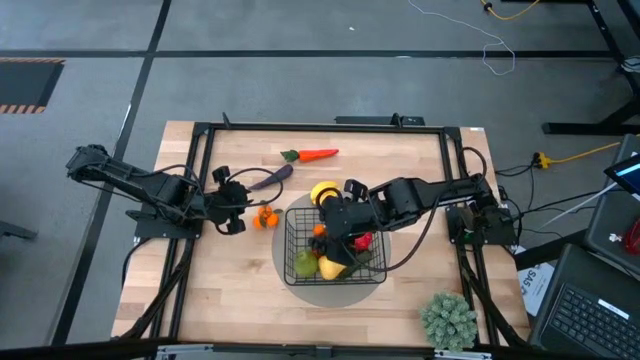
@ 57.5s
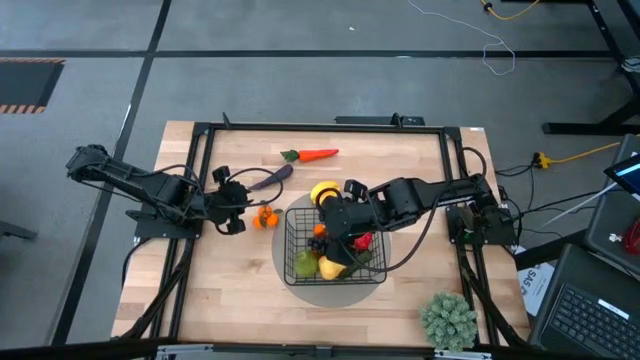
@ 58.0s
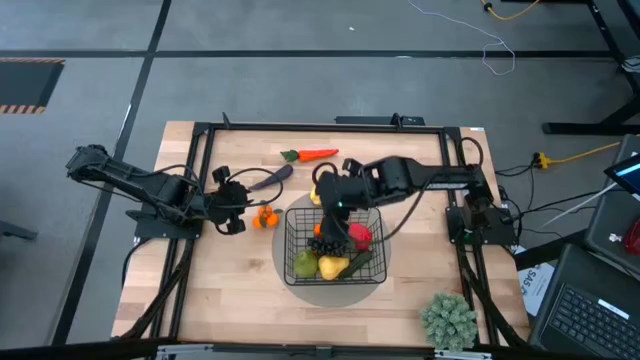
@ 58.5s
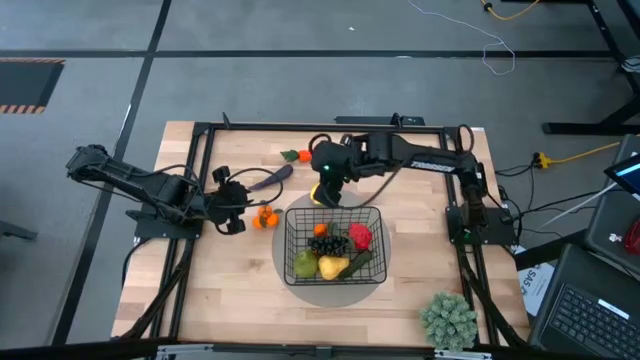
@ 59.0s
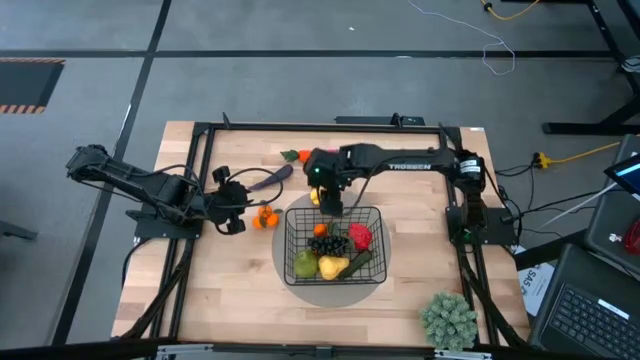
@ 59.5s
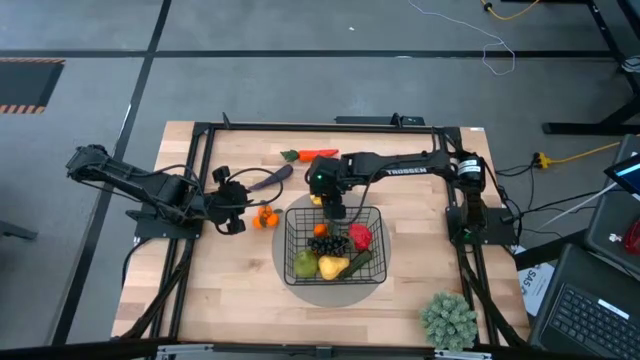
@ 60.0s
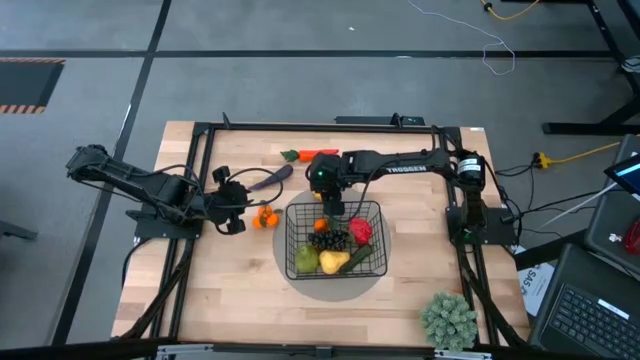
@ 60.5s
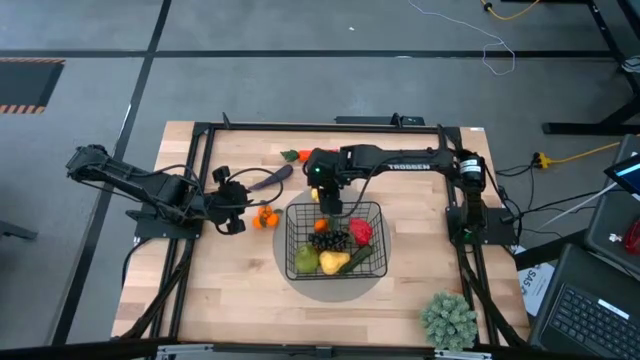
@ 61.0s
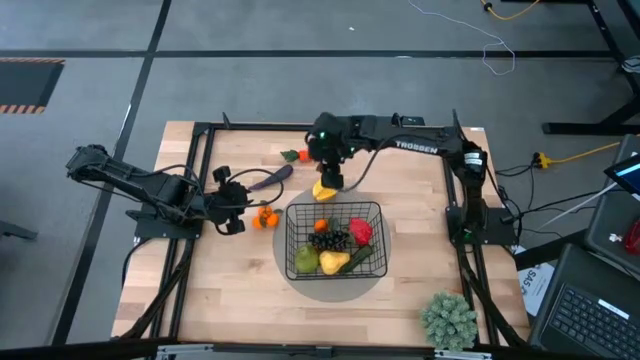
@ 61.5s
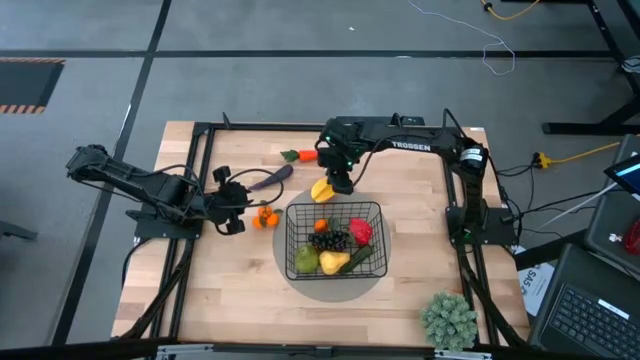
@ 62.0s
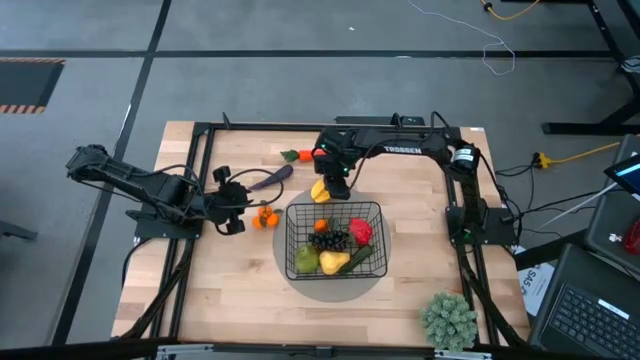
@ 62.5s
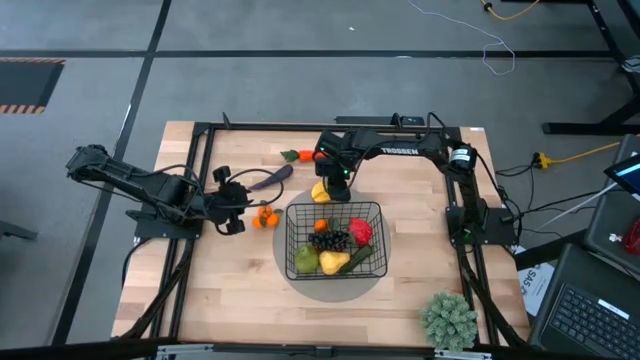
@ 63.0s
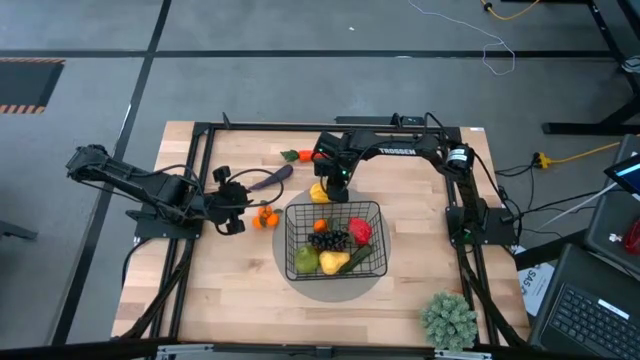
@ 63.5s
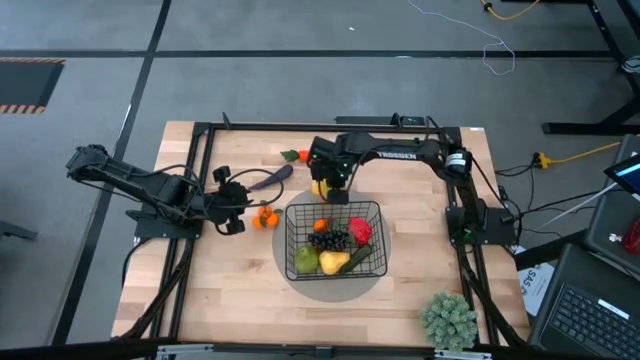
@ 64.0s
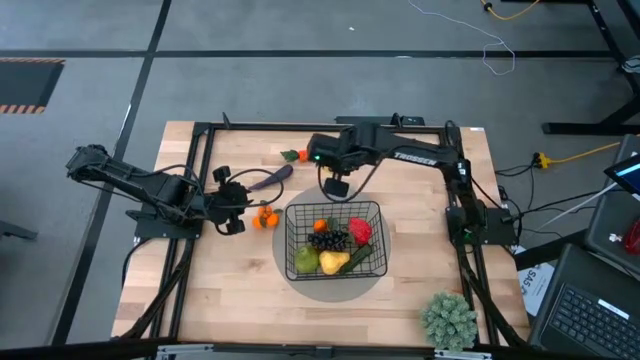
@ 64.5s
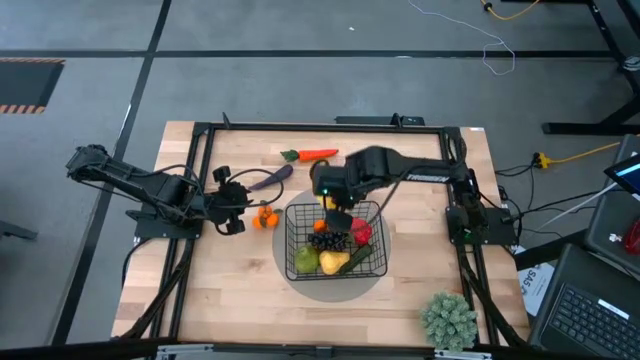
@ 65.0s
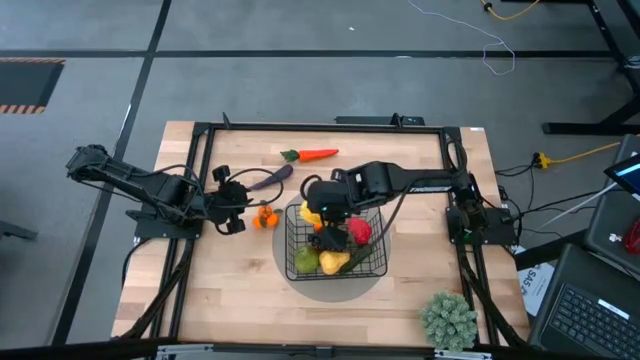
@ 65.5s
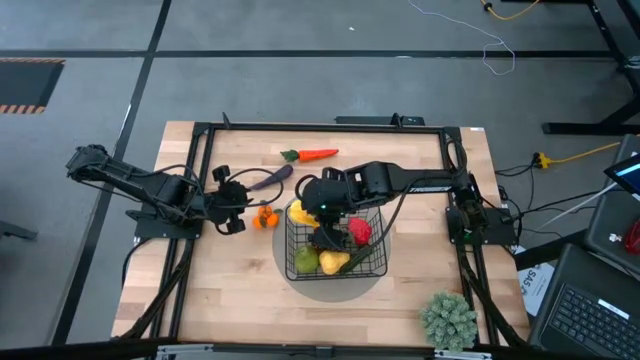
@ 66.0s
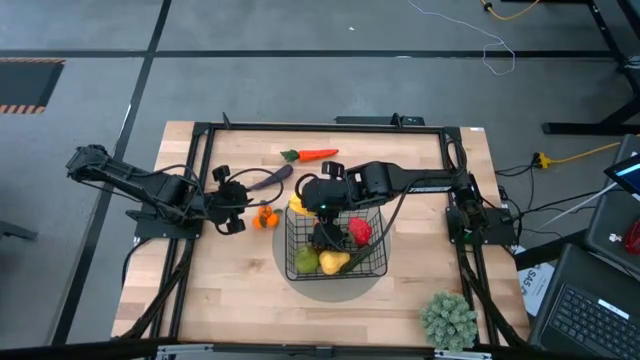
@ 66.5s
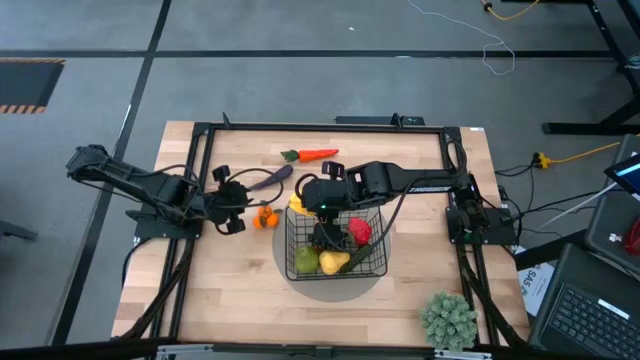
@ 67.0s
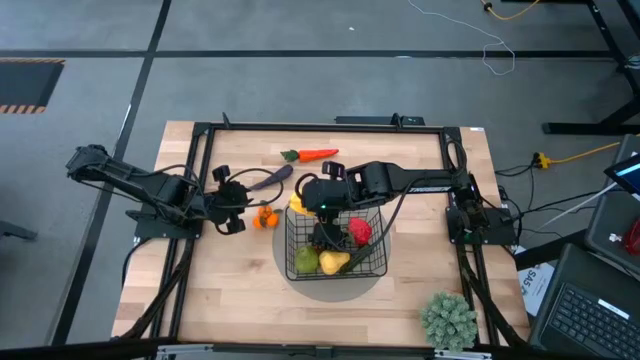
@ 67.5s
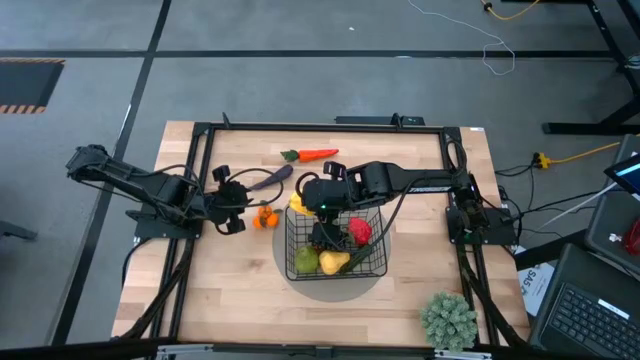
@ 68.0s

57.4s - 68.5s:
Task: Build produce basket
Put the yellow starfruit into the black wire basket

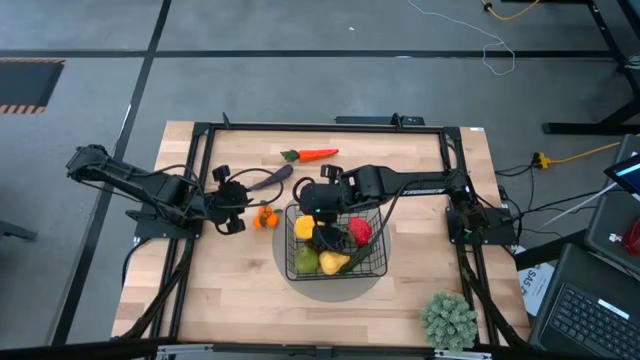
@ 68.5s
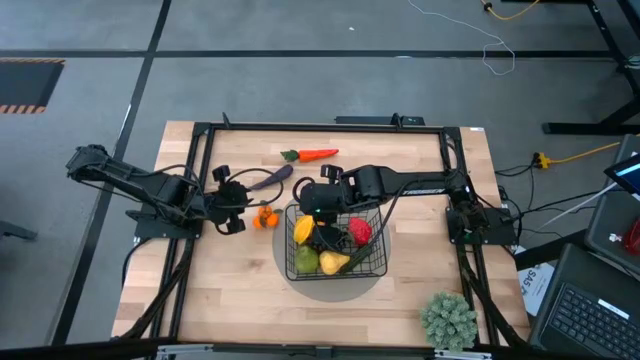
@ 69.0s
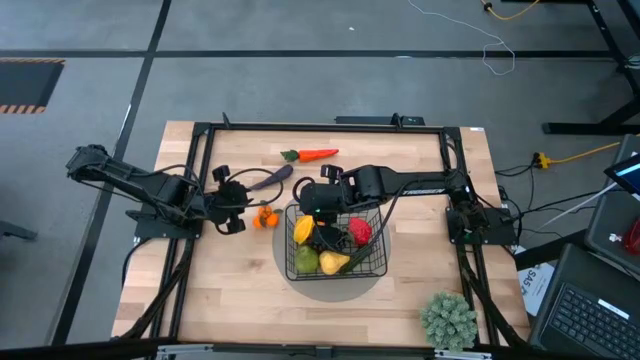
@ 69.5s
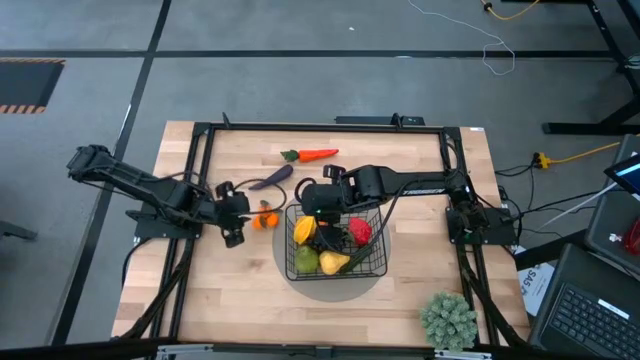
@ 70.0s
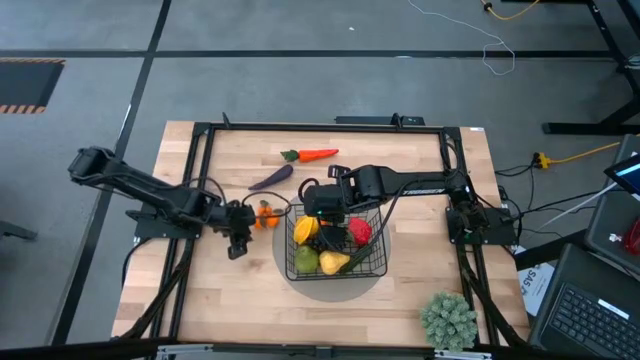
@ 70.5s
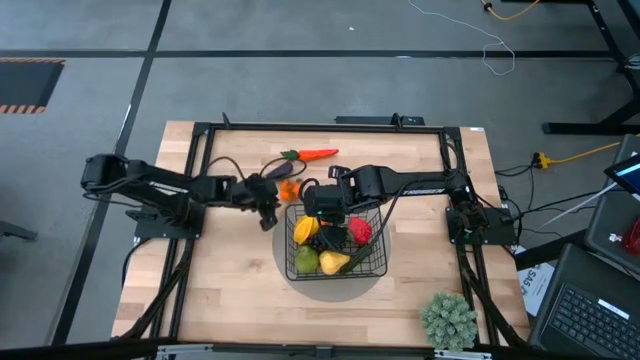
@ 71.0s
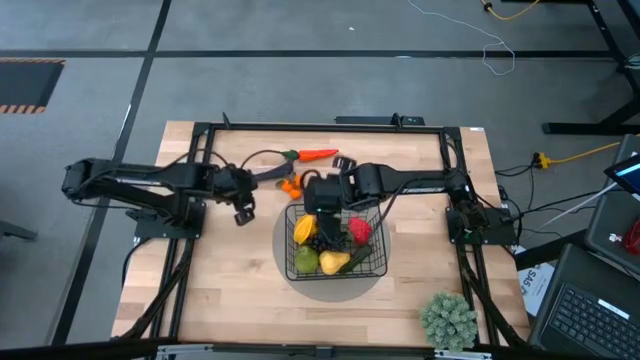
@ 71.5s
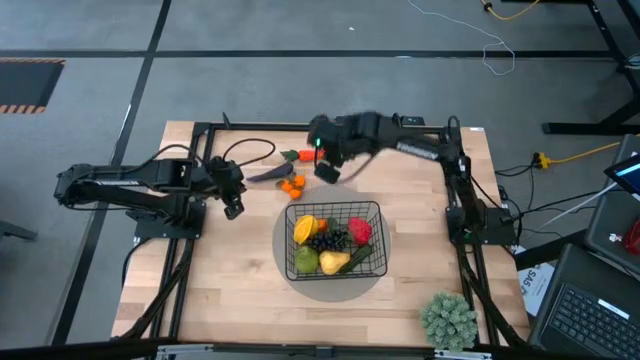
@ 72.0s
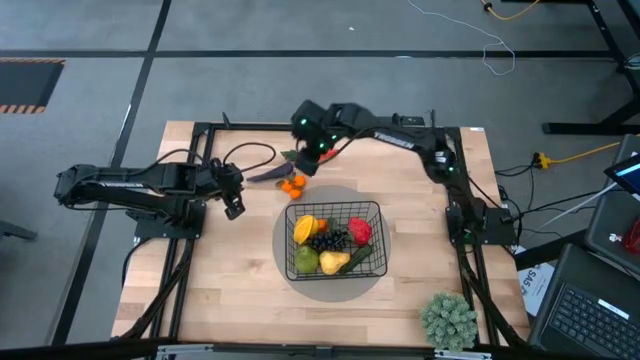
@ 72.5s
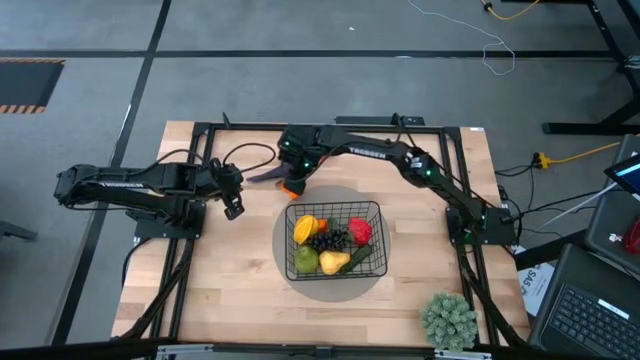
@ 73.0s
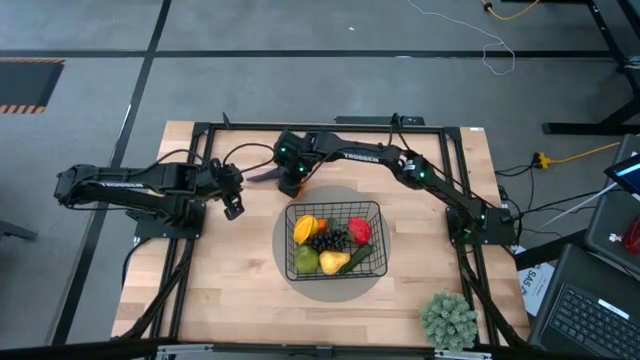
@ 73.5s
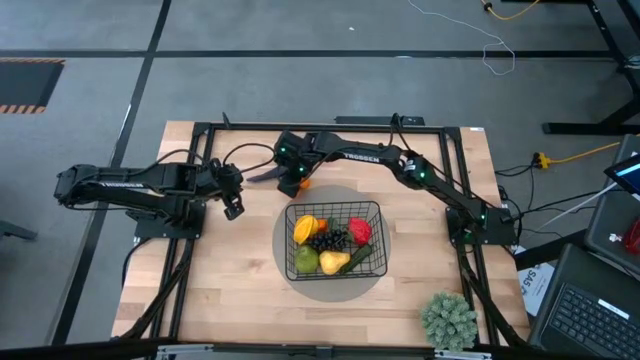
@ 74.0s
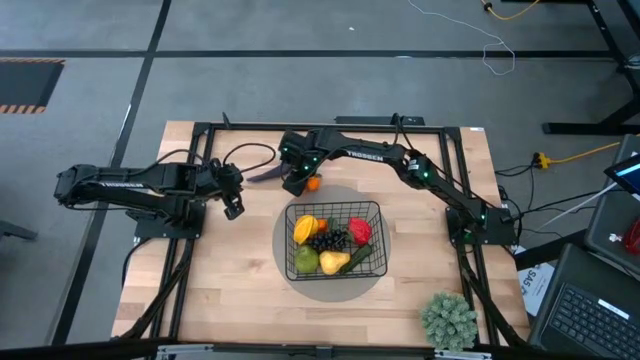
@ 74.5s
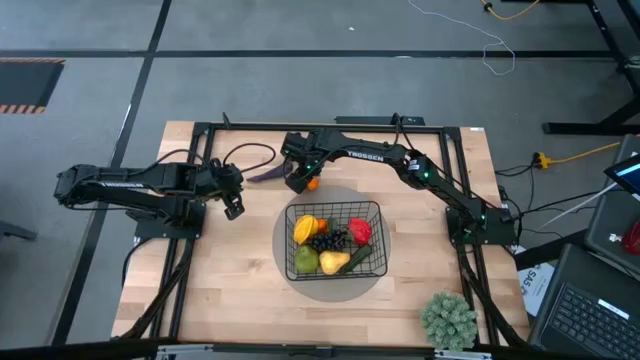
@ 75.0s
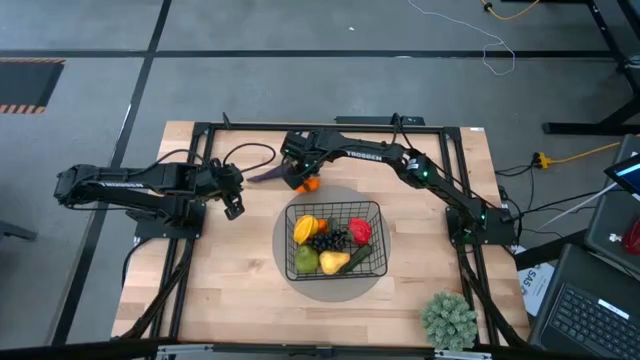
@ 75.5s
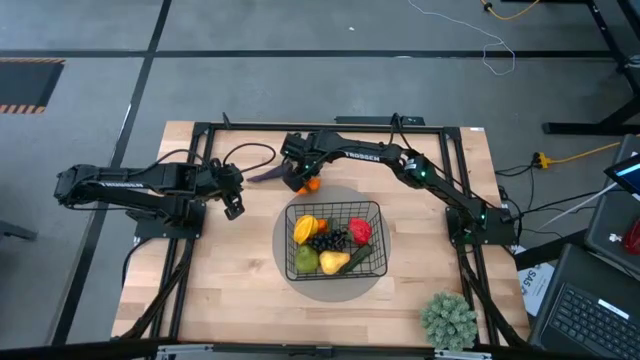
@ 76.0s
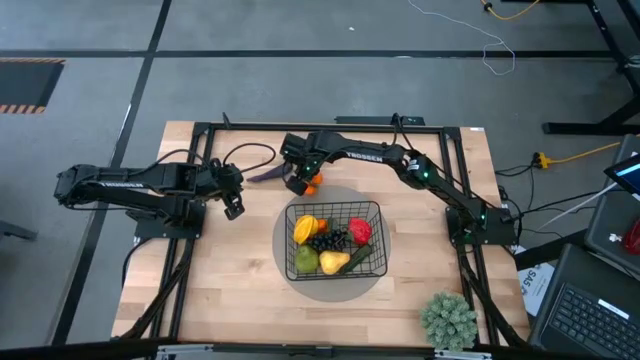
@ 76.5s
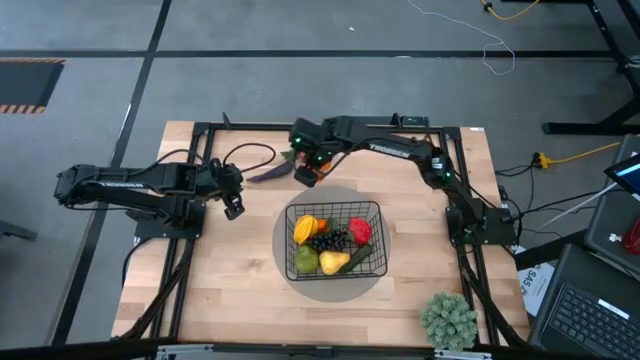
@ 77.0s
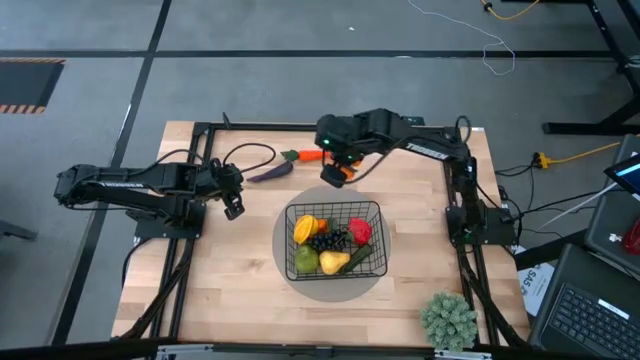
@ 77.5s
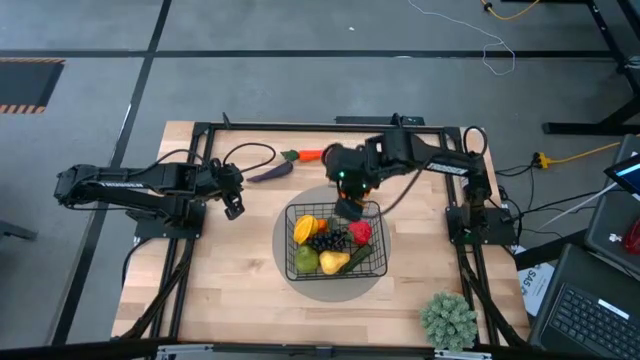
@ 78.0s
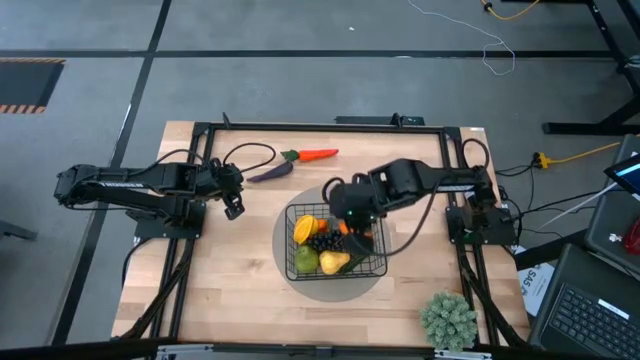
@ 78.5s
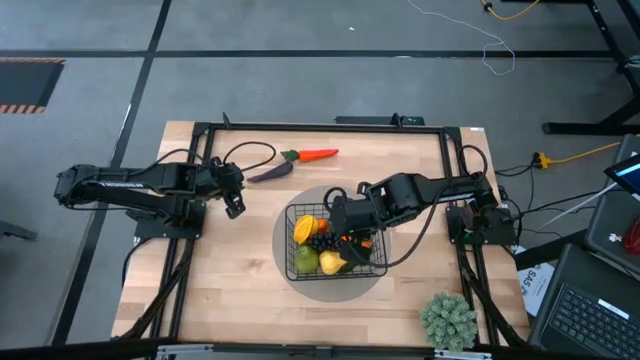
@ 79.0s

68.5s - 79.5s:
Put the orange tangerine into the black wire basket
